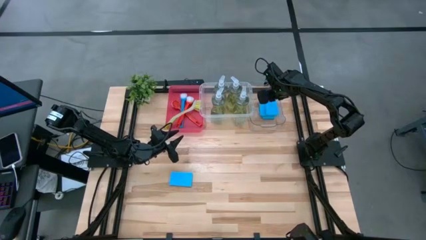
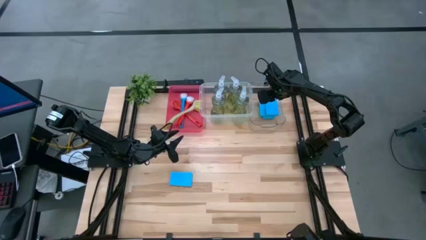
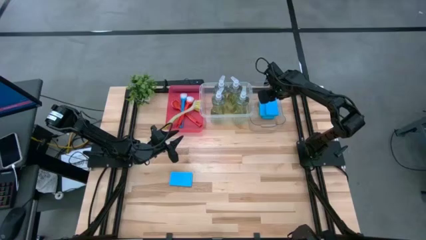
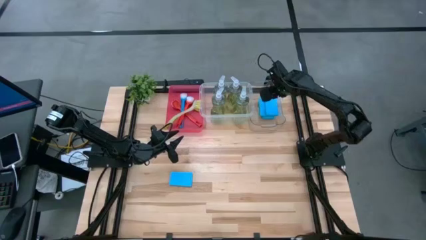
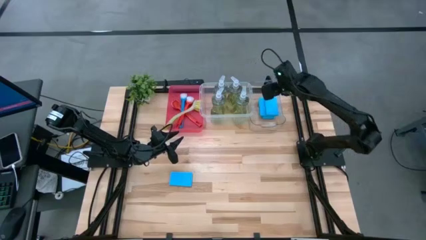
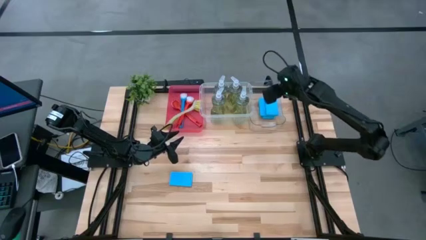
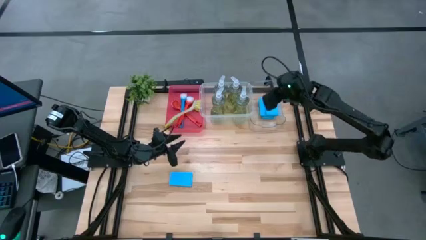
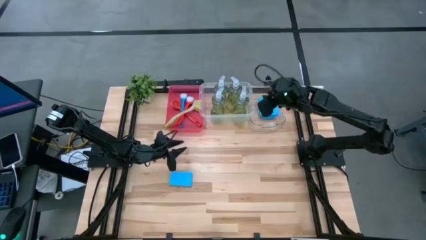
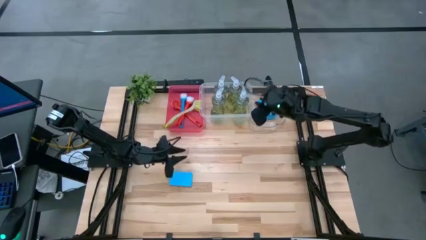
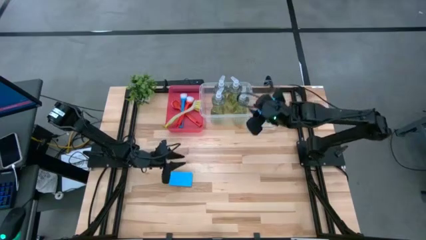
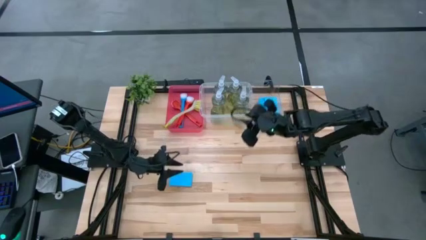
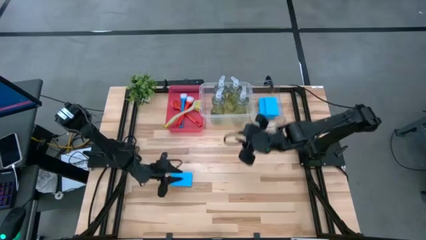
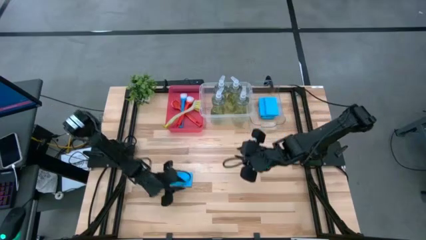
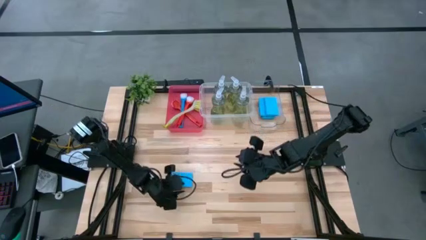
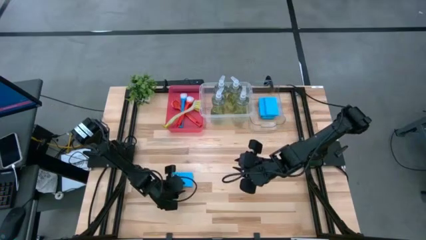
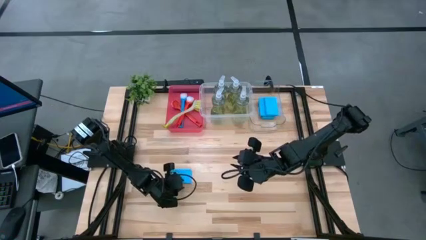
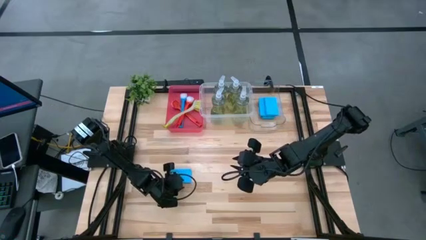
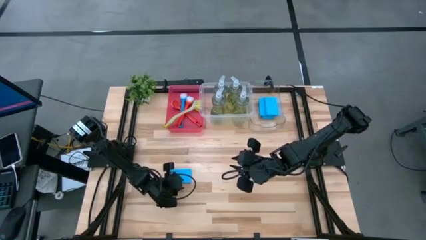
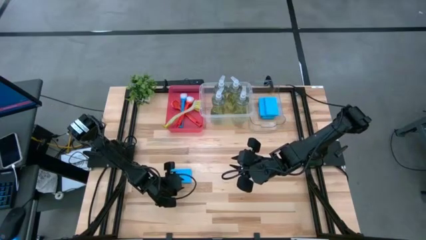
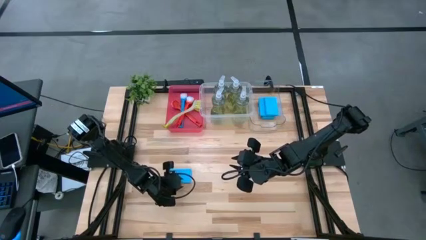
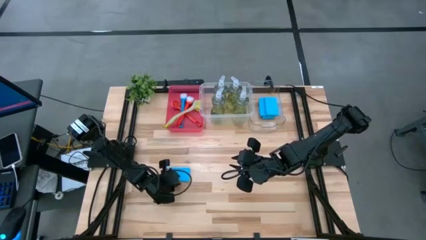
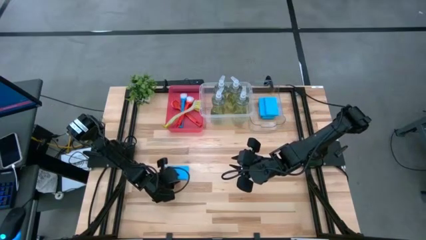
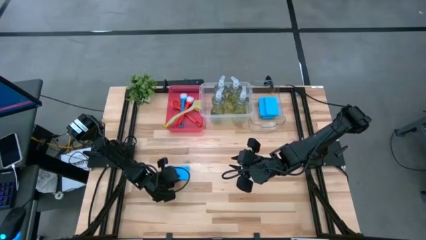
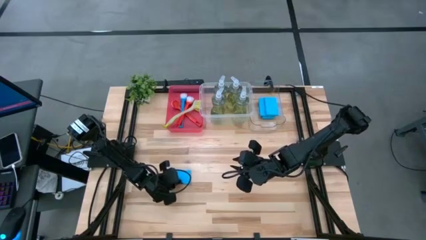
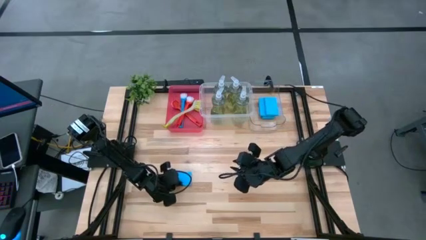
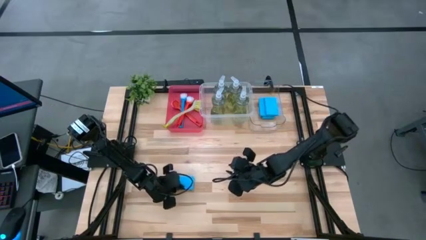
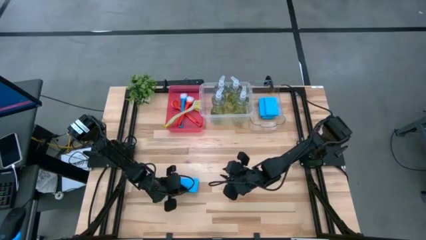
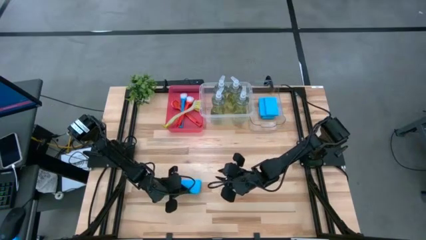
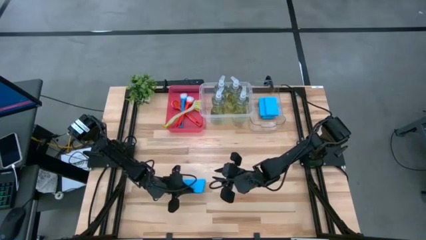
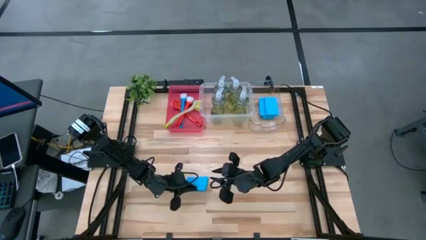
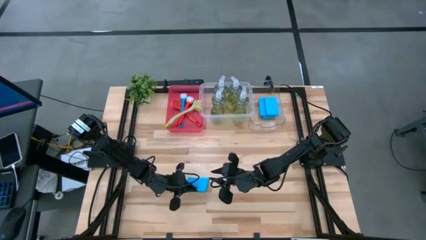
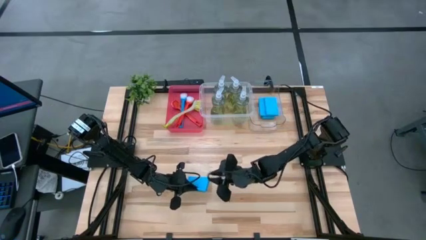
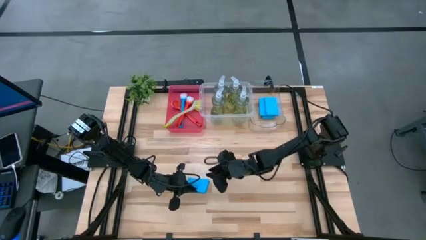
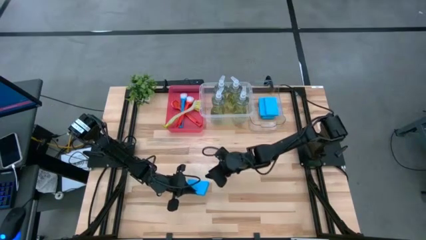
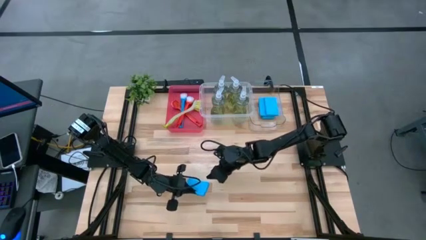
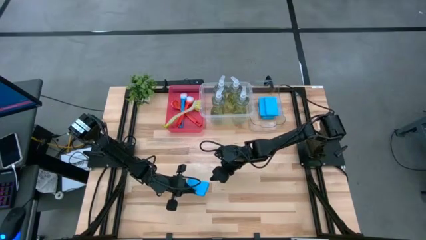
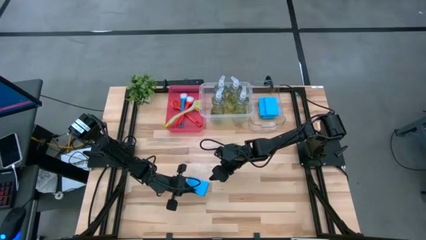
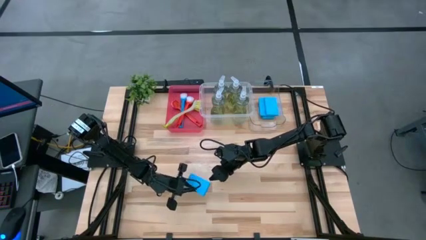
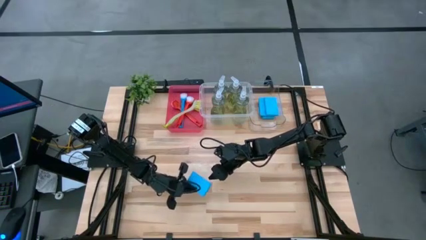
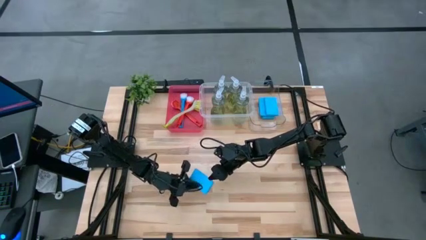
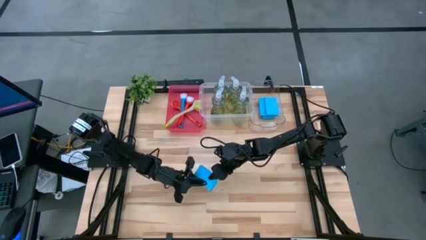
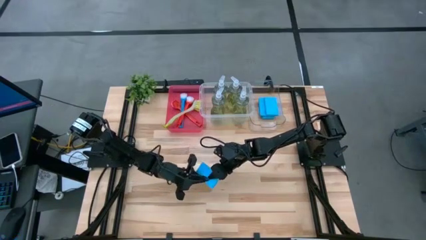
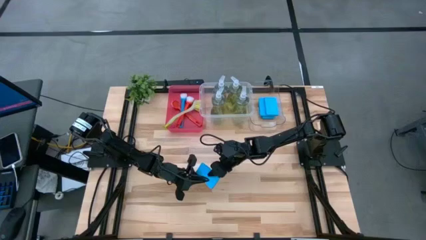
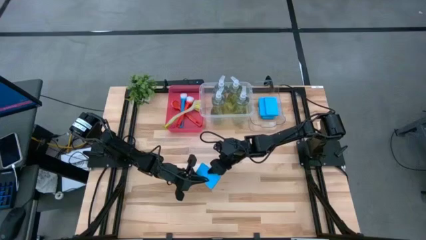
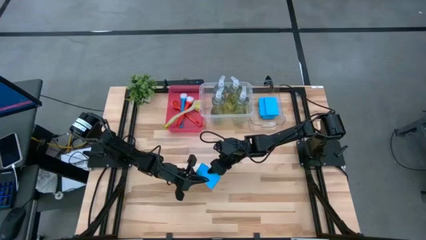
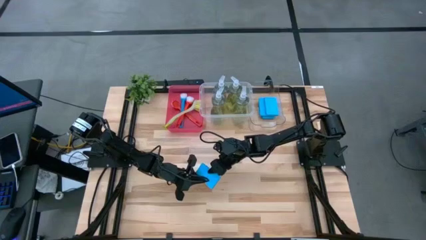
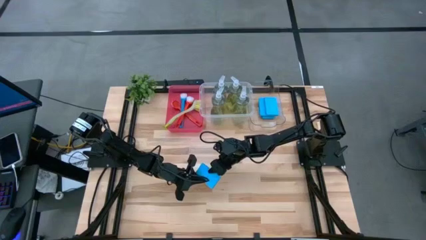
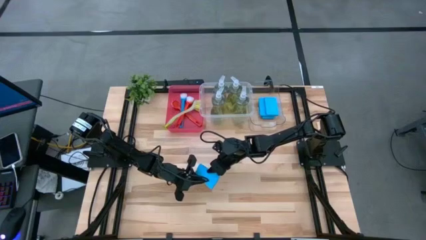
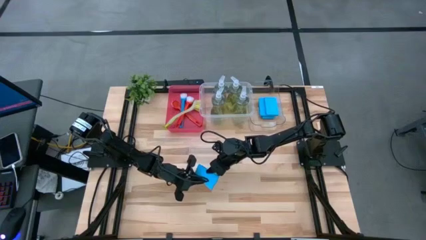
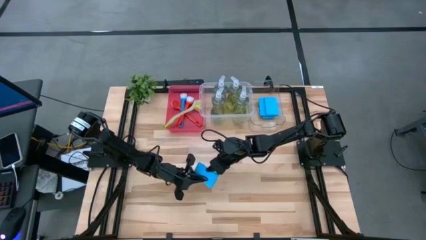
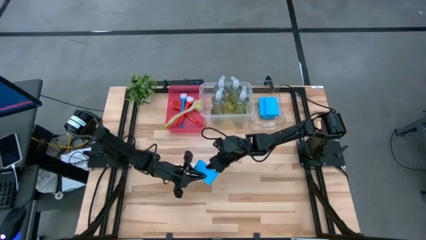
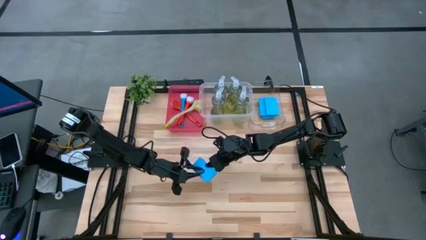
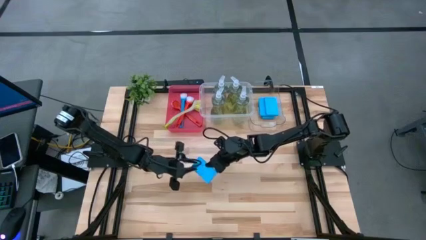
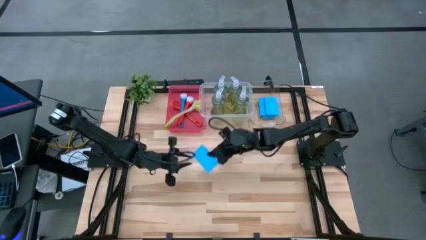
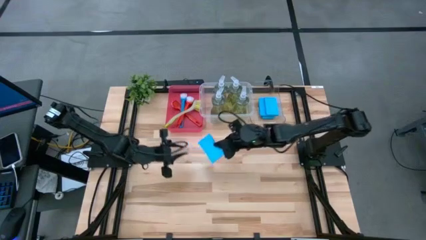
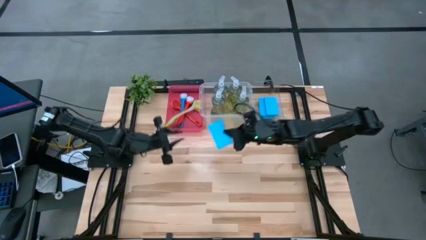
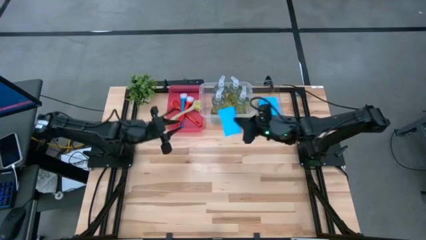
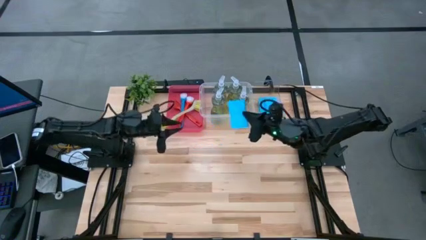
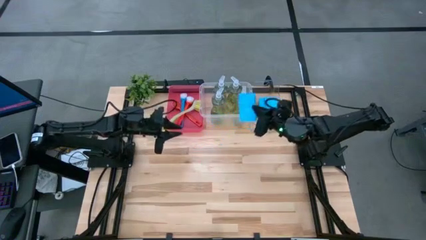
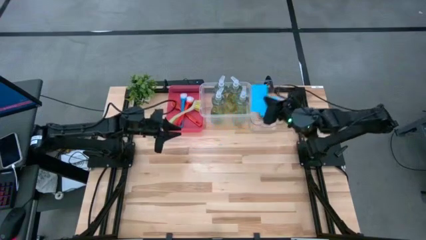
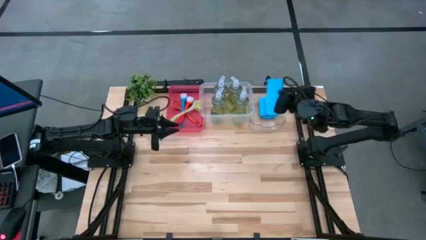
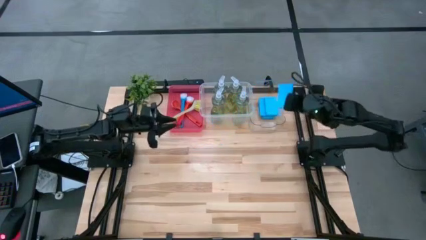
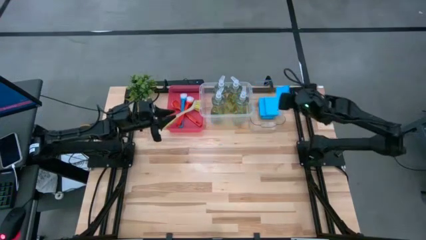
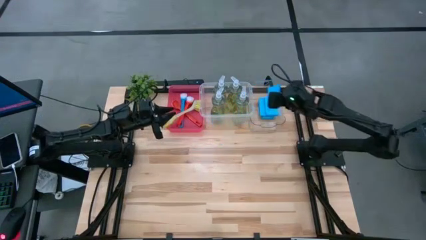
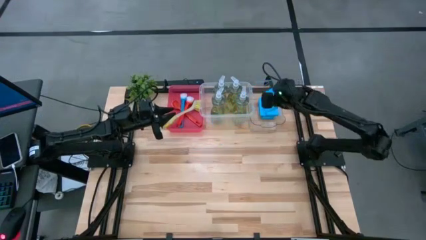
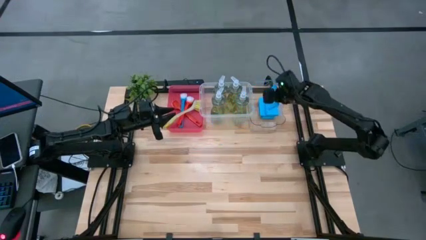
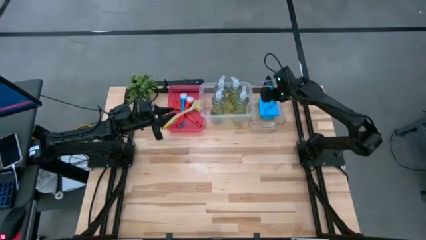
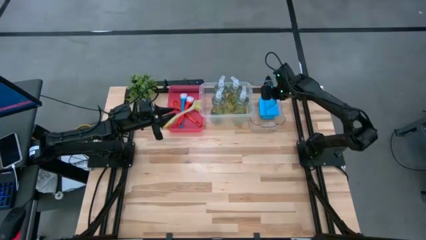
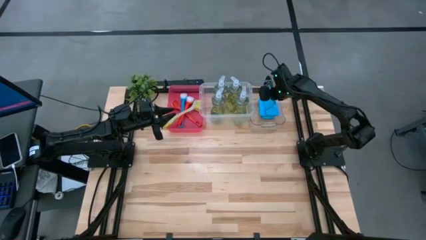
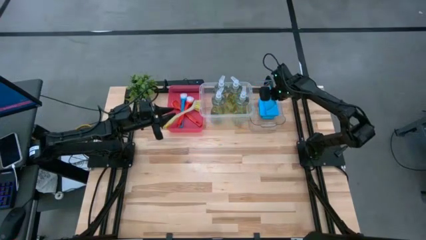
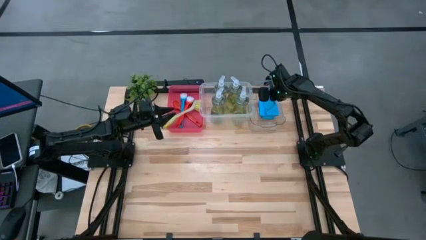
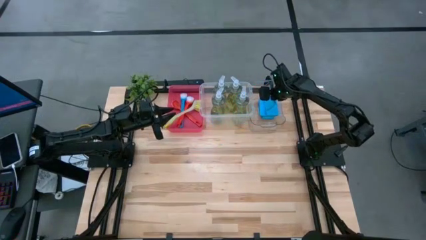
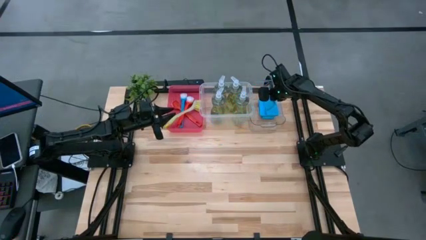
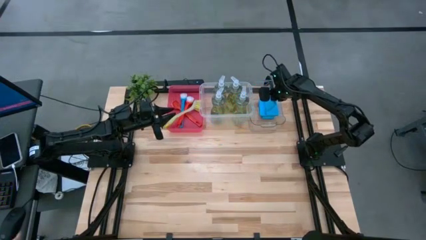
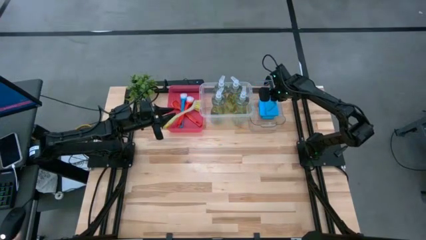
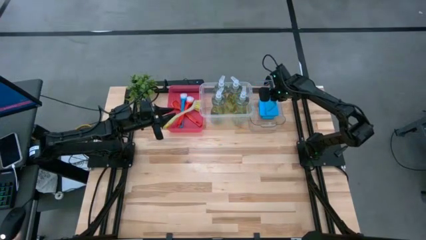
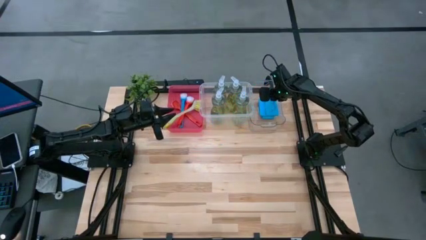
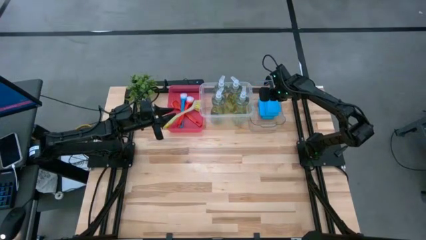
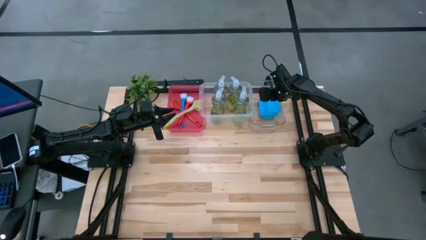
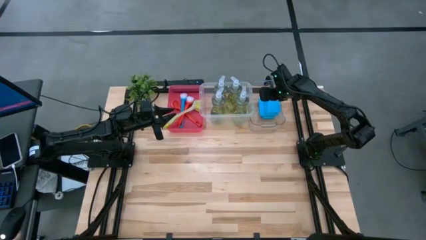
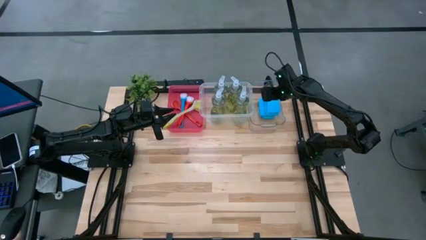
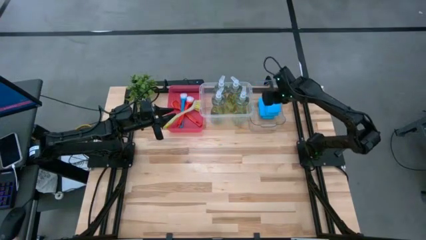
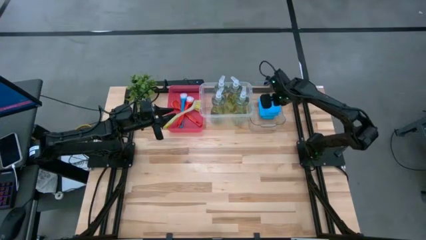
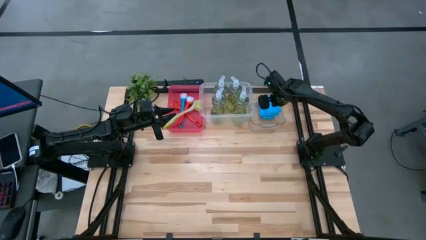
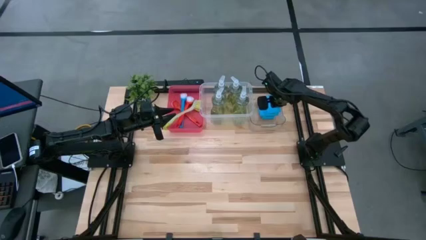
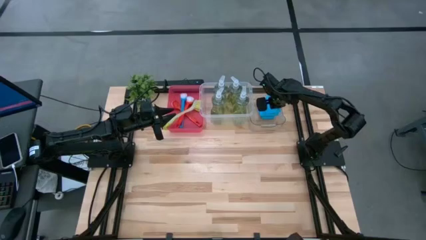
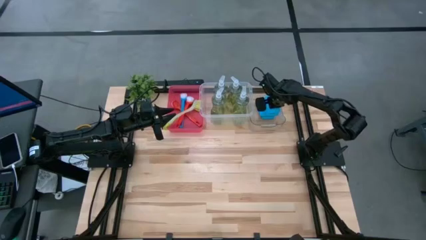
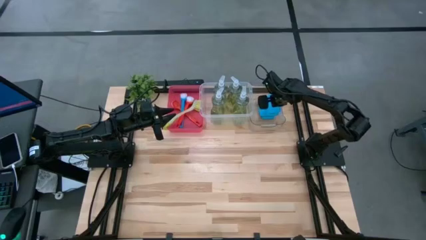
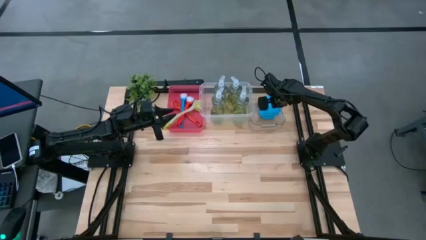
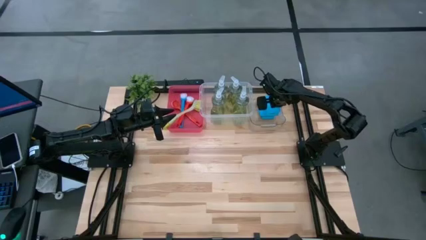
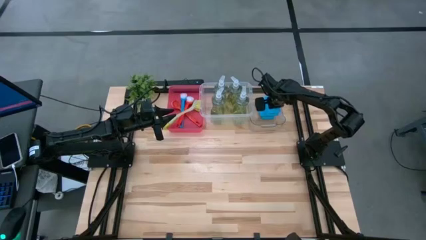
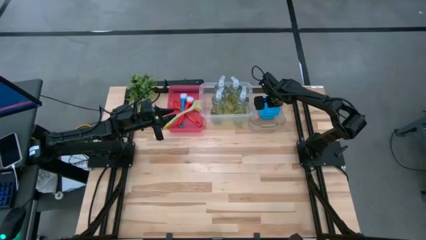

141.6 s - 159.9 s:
Task: Pick & Place Kitchen Sink Supplies
Put the blue dishwashing sponge into the transparent bin
